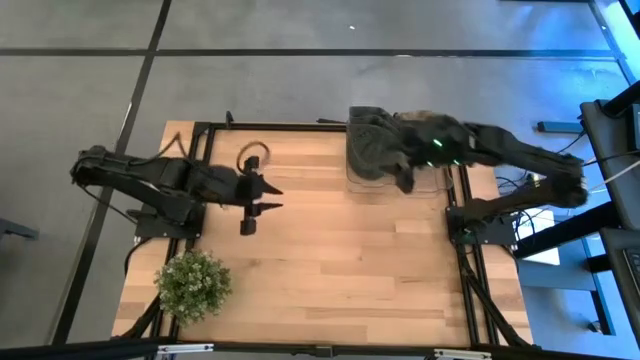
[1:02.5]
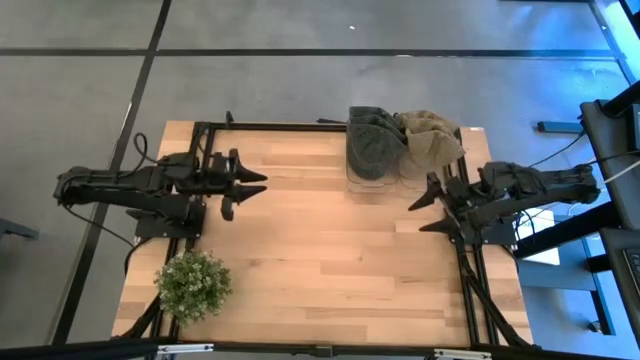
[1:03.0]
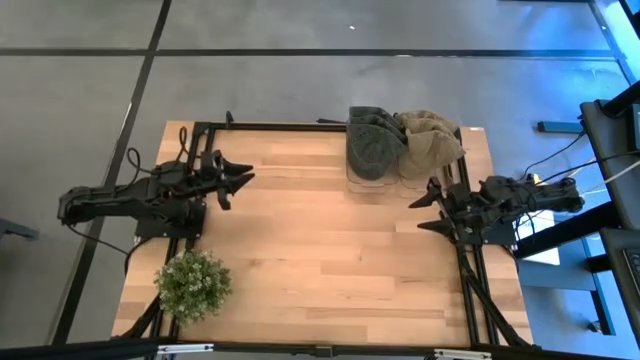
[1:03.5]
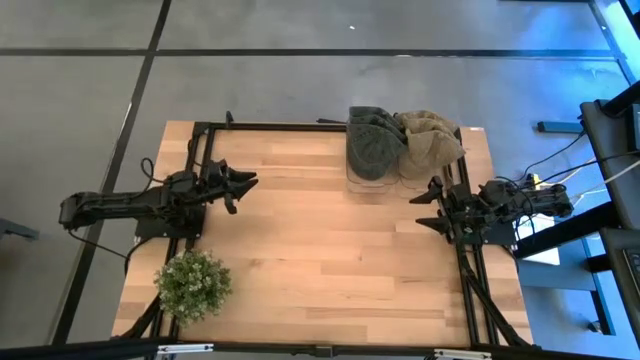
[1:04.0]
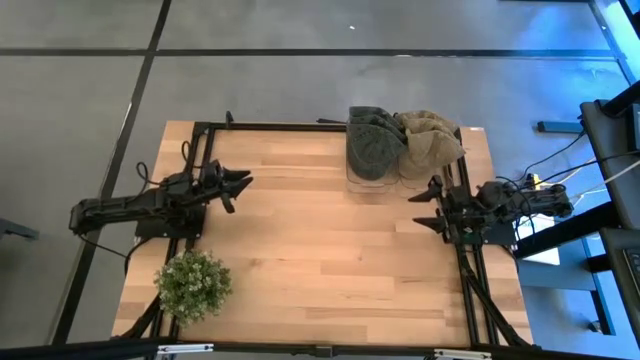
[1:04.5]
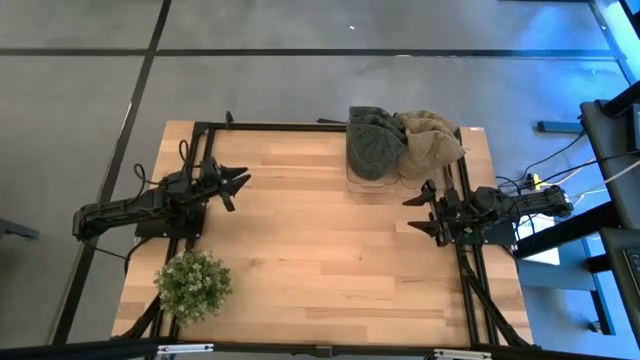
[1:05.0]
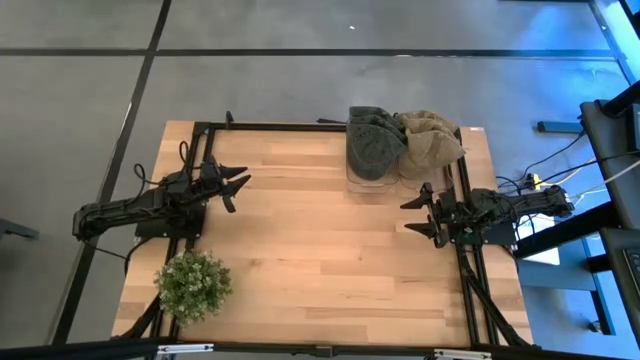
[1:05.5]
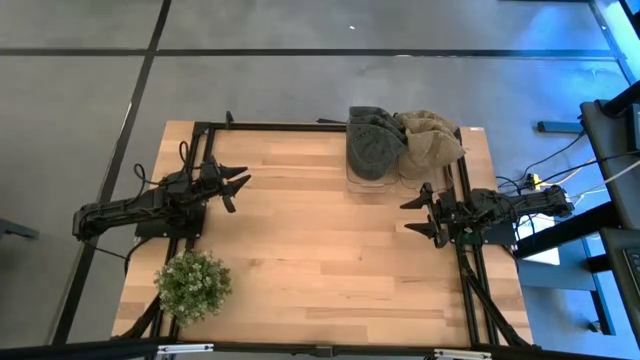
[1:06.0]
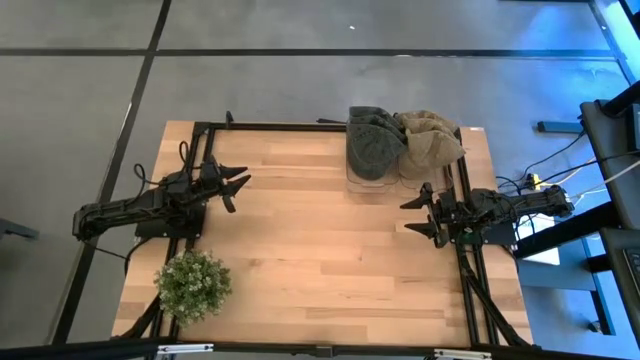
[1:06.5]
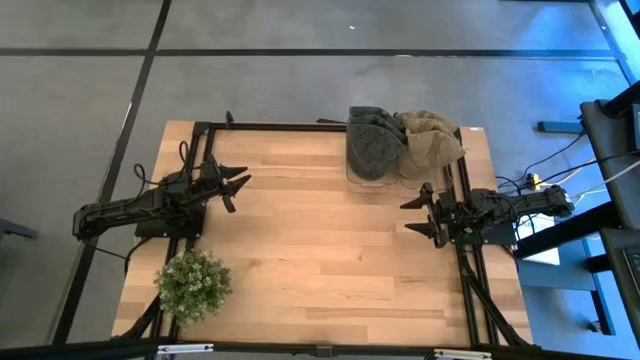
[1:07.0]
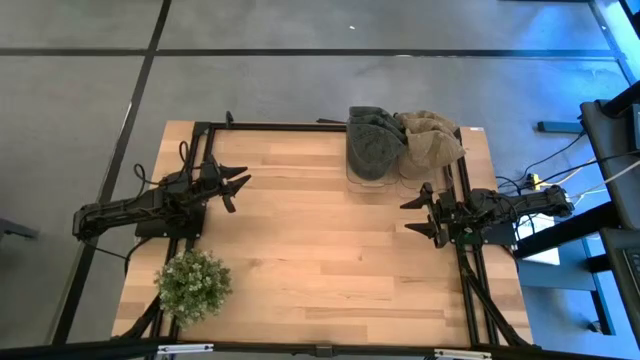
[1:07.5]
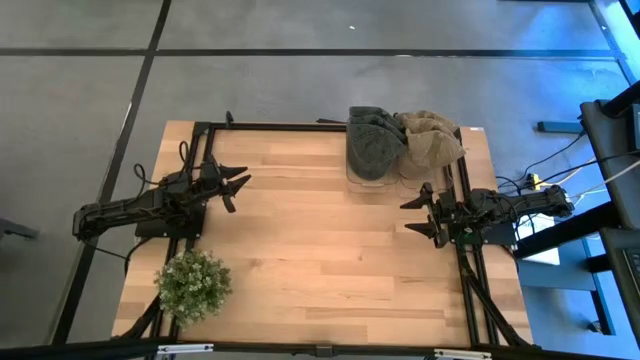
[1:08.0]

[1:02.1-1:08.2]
Task: Pick & Place hat
Return to Home Position

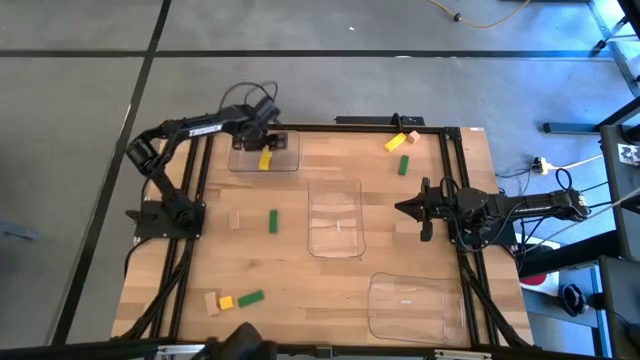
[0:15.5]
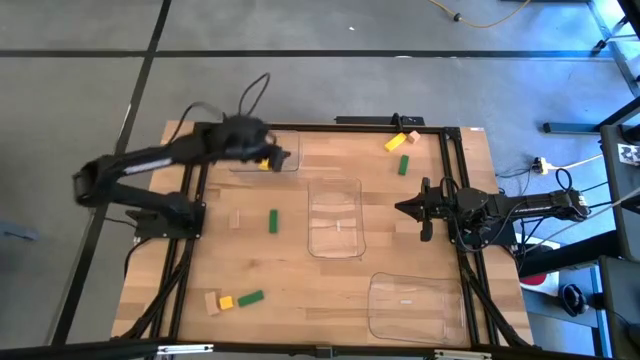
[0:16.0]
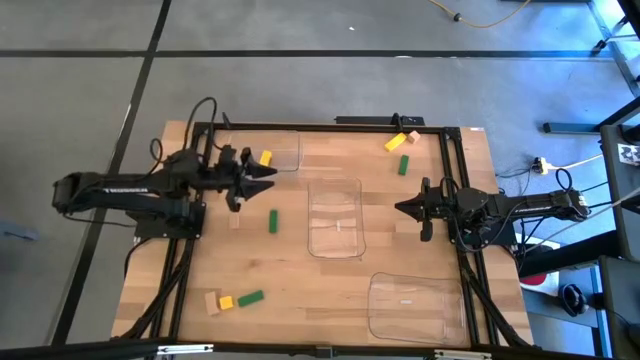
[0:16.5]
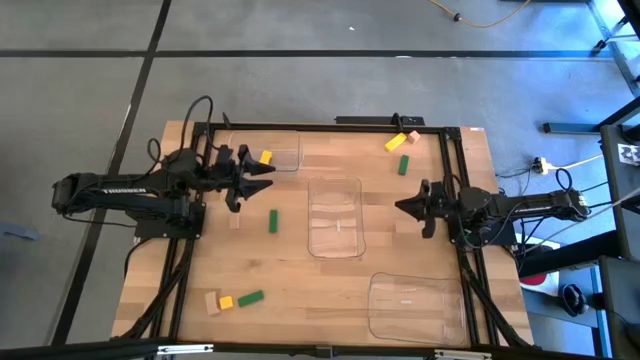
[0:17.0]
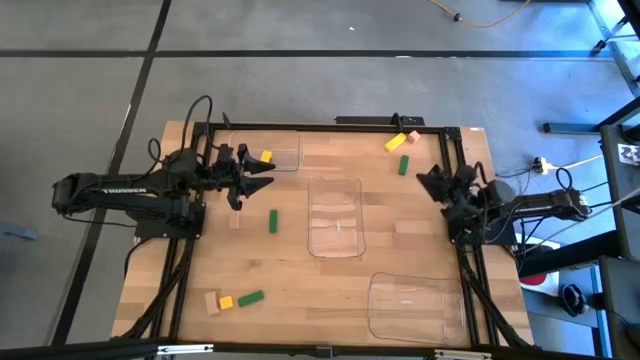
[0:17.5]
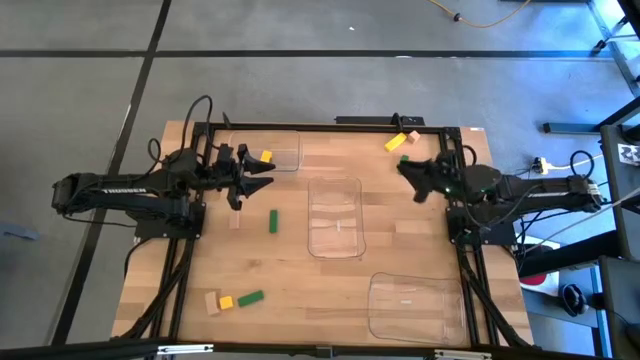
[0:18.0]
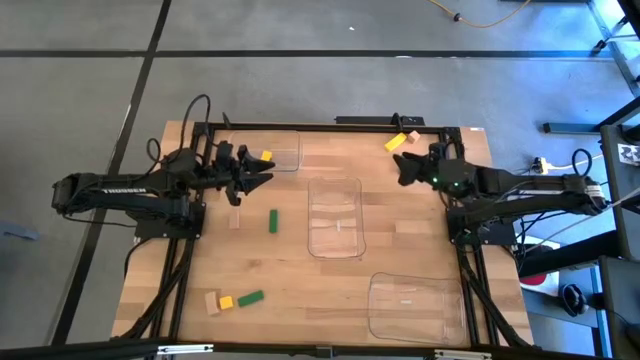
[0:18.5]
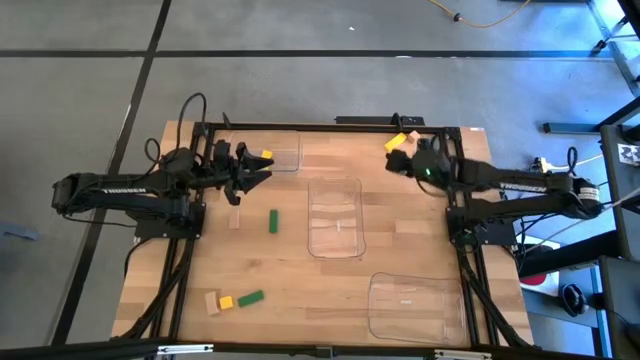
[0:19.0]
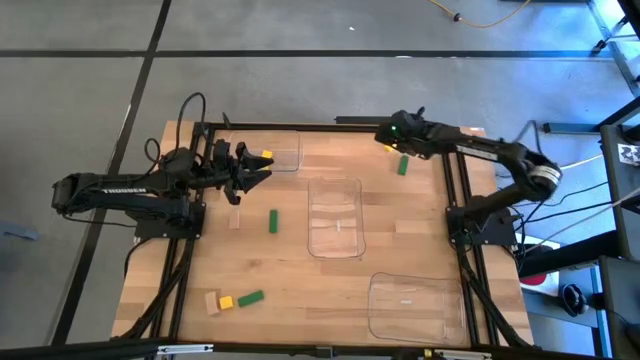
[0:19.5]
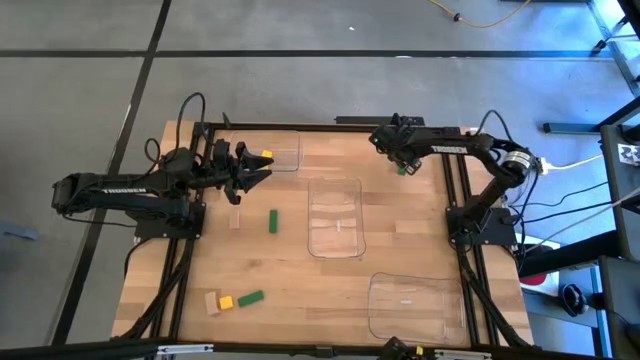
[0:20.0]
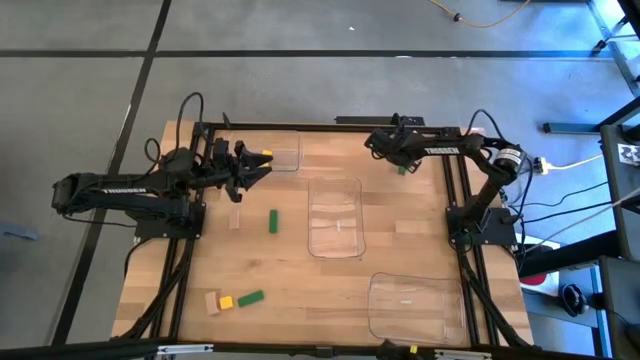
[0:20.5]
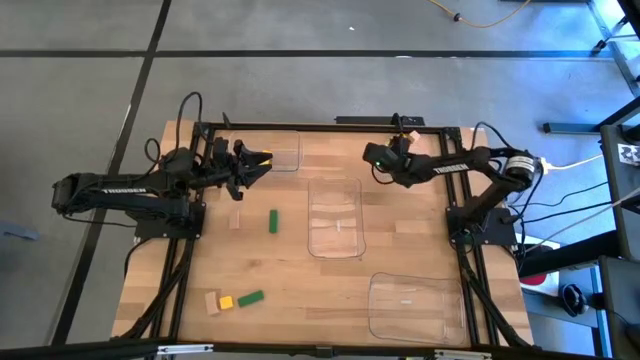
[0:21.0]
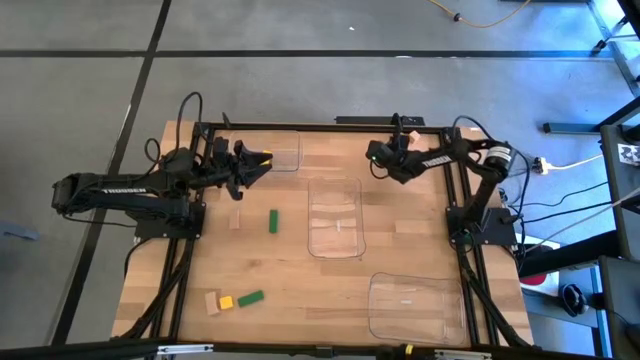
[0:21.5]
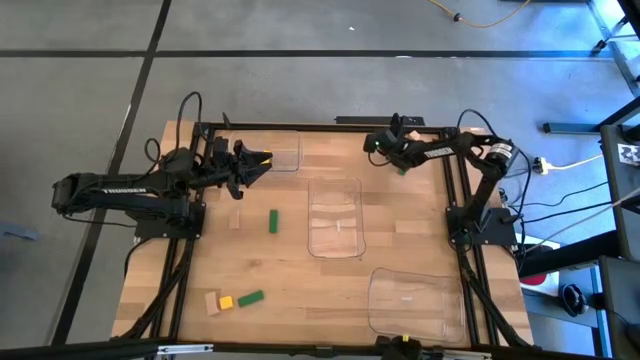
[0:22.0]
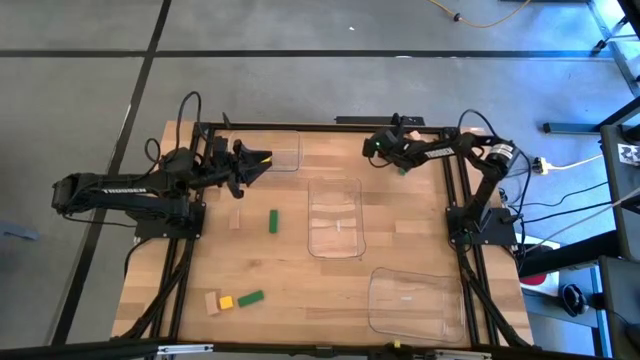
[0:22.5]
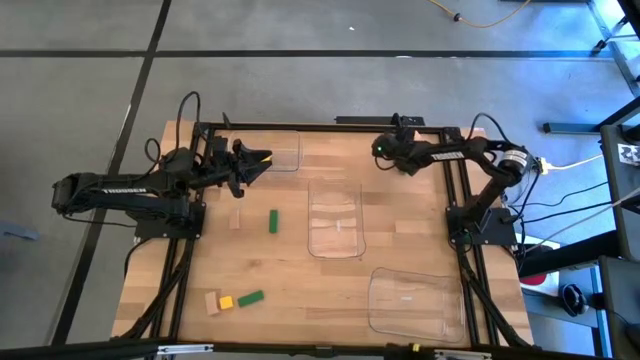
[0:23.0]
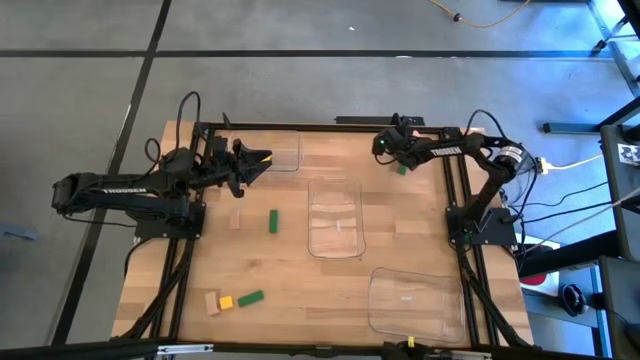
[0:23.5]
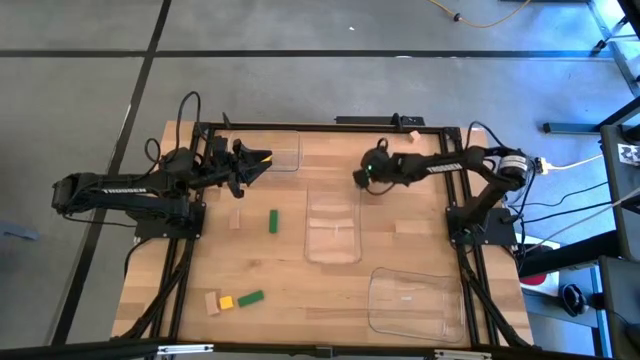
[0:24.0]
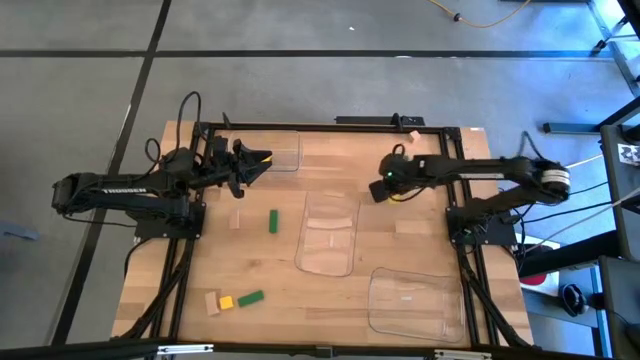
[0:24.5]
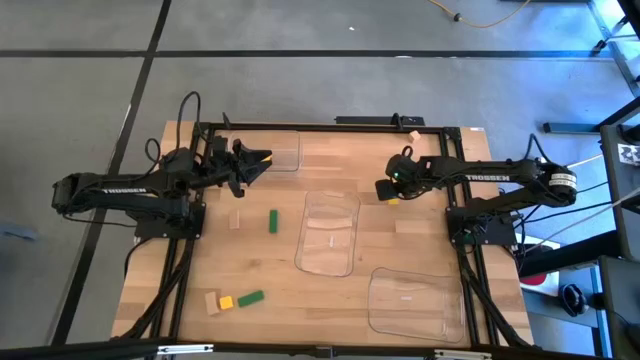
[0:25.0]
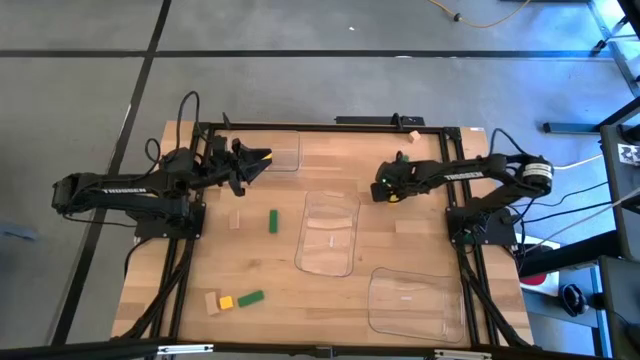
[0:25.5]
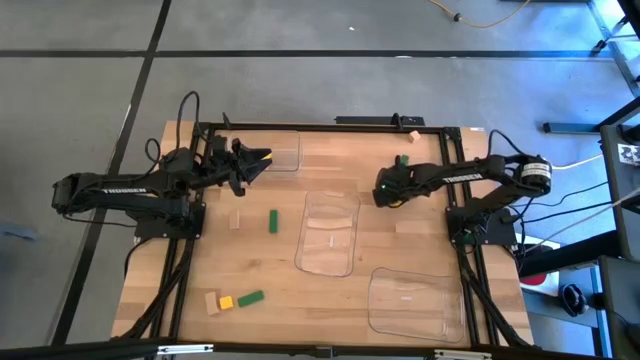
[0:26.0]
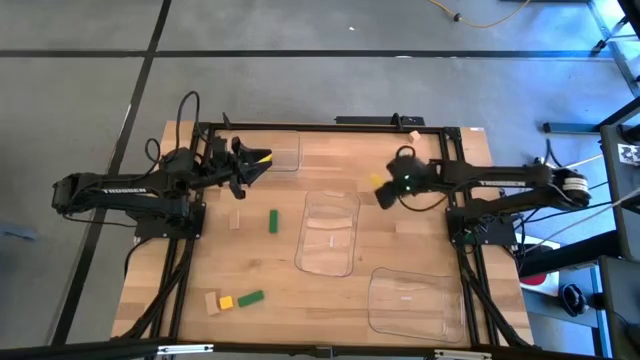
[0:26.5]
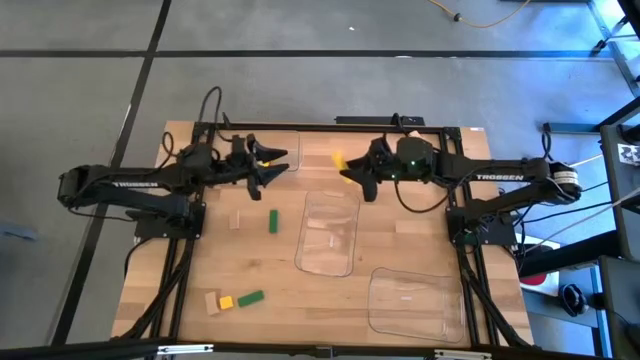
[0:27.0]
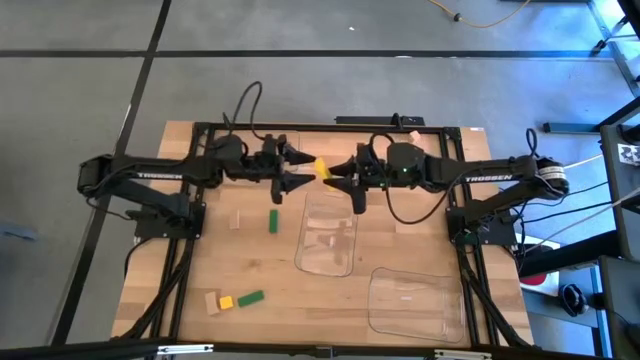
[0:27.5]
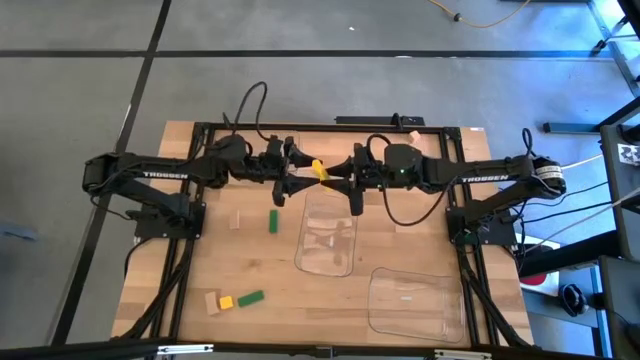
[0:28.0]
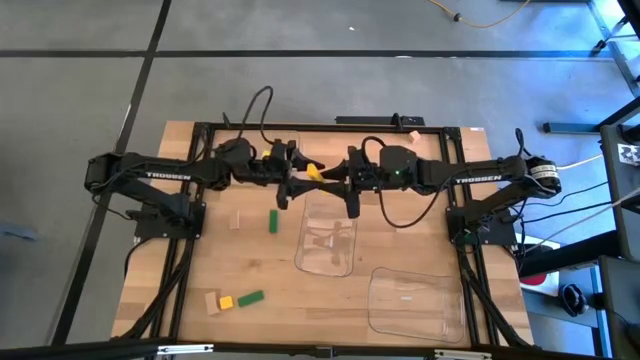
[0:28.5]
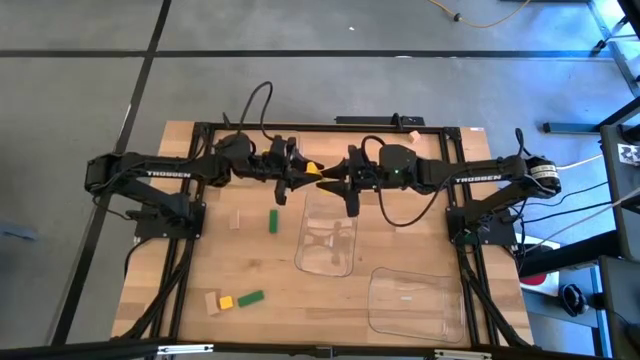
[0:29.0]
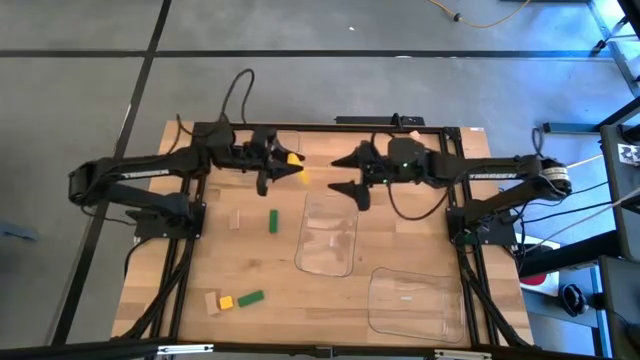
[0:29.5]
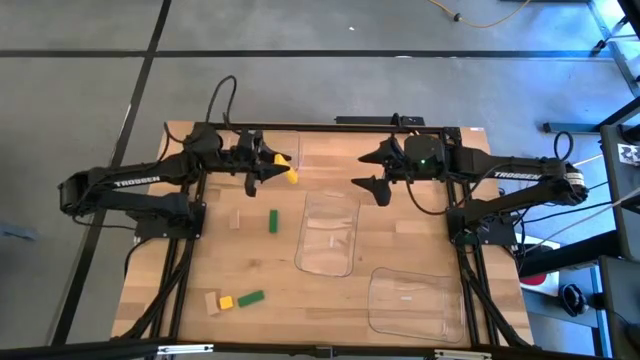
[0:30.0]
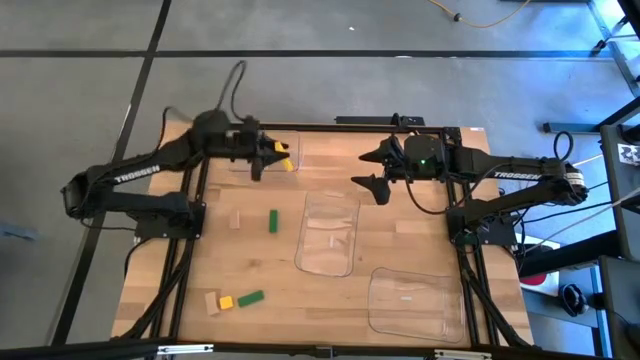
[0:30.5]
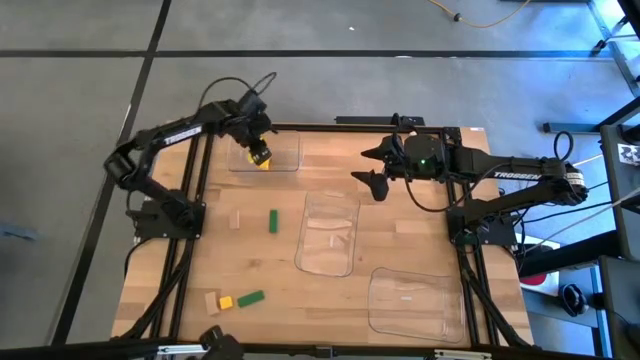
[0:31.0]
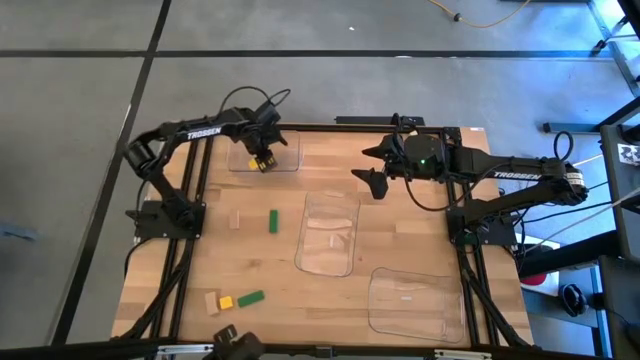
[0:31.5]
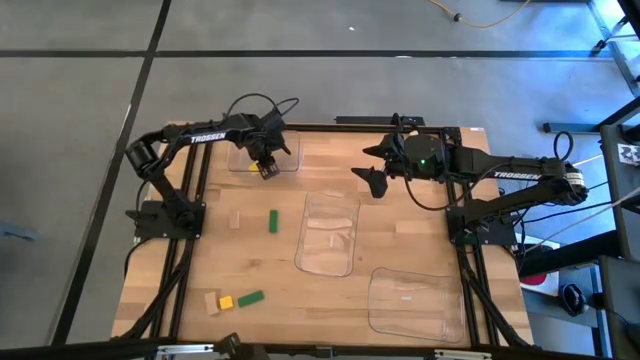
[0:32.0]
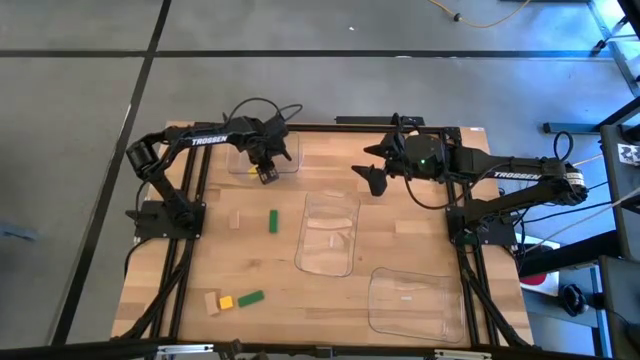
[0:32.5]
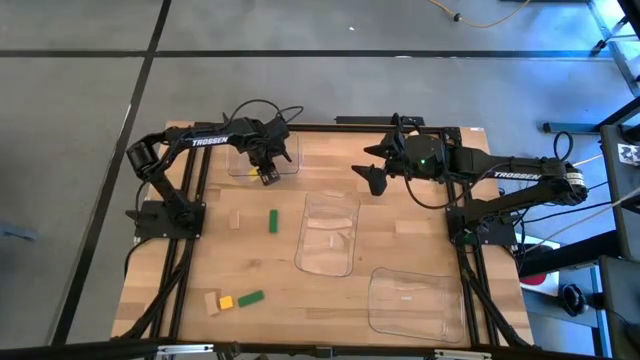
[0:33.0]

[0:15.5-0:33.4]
Task: Sort & place blocks by color
Put the top yellow block into the top transparent bin
